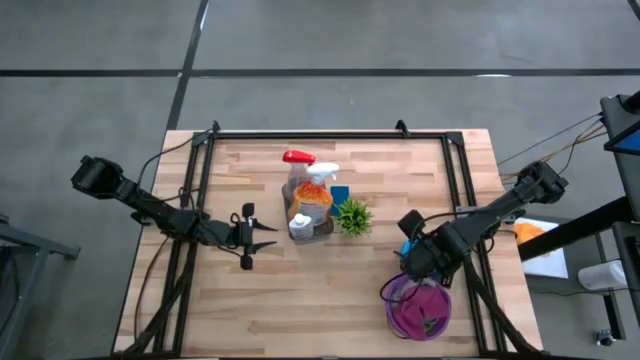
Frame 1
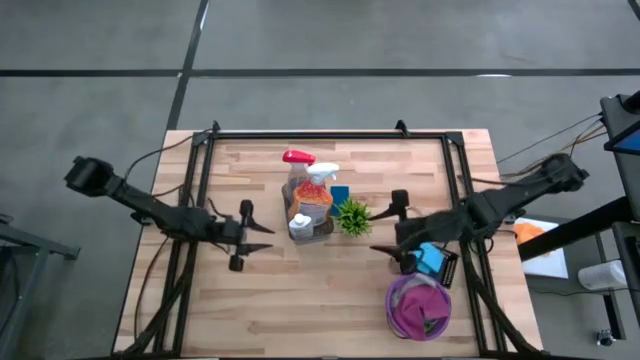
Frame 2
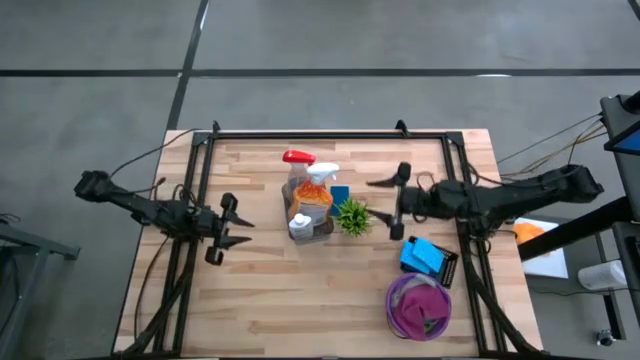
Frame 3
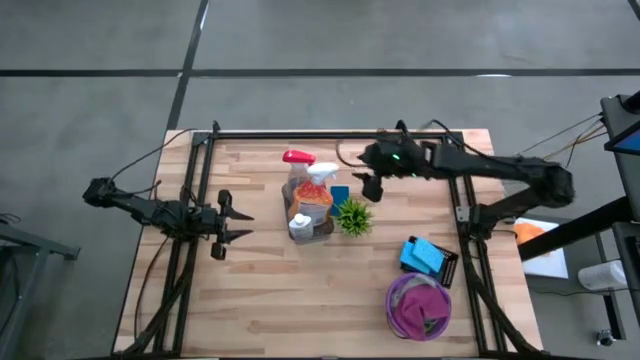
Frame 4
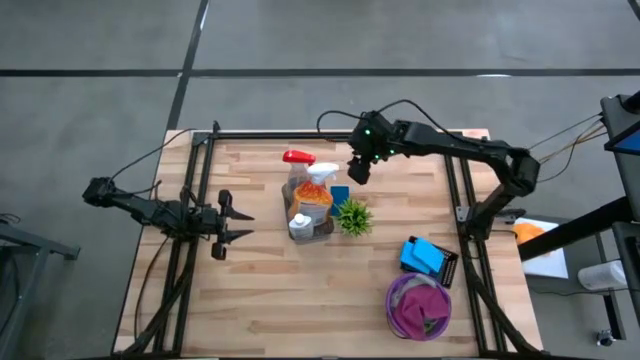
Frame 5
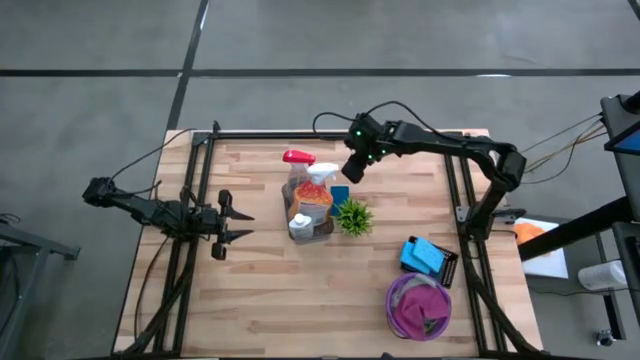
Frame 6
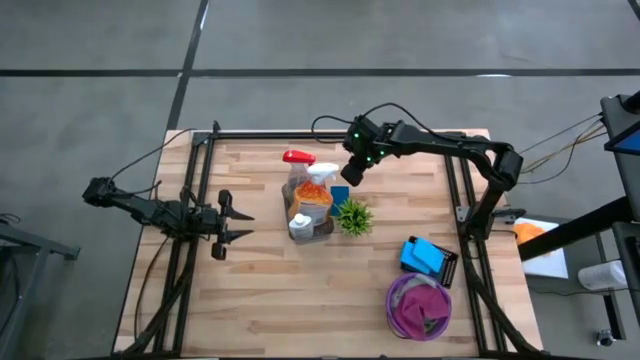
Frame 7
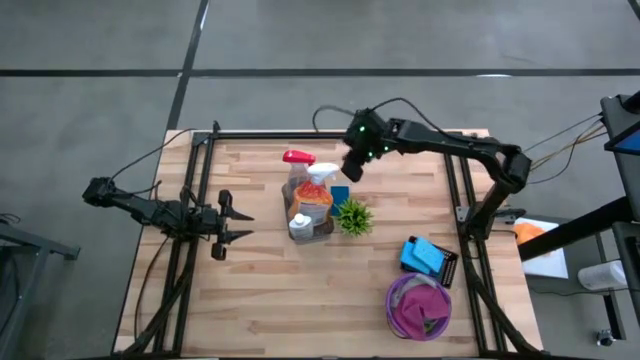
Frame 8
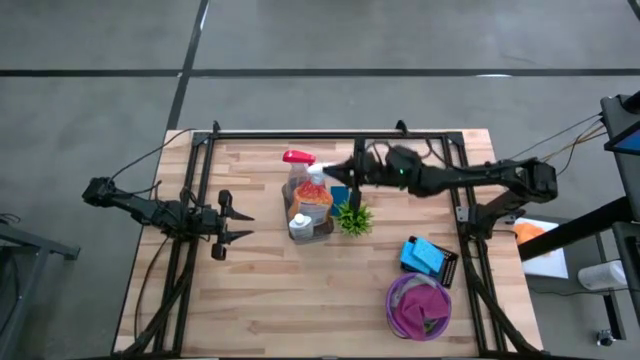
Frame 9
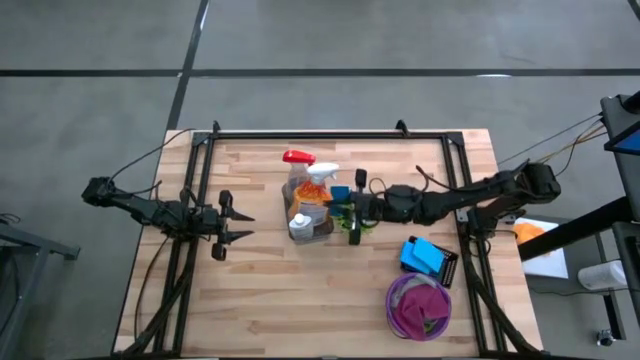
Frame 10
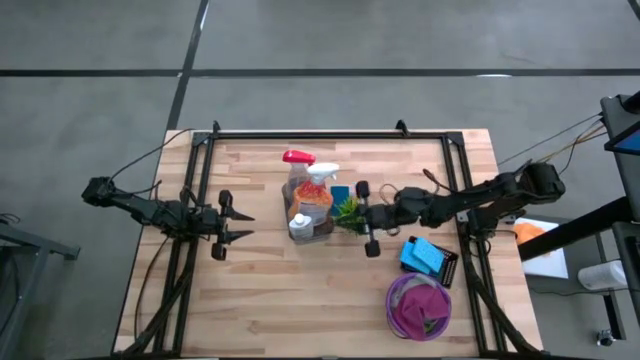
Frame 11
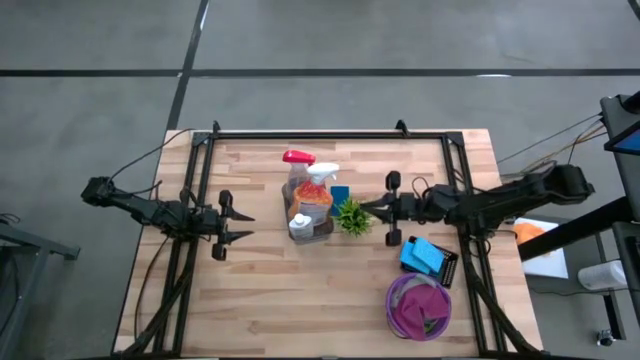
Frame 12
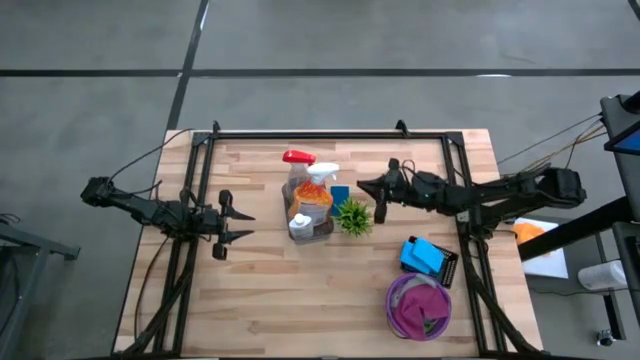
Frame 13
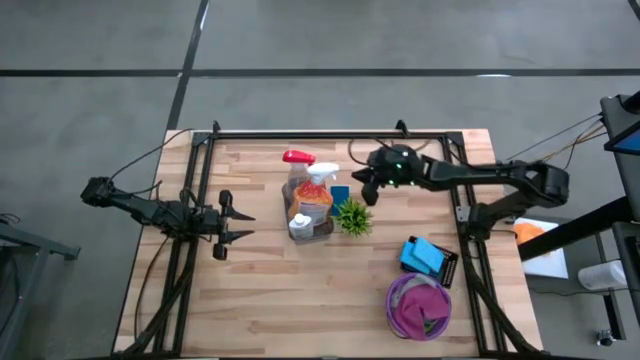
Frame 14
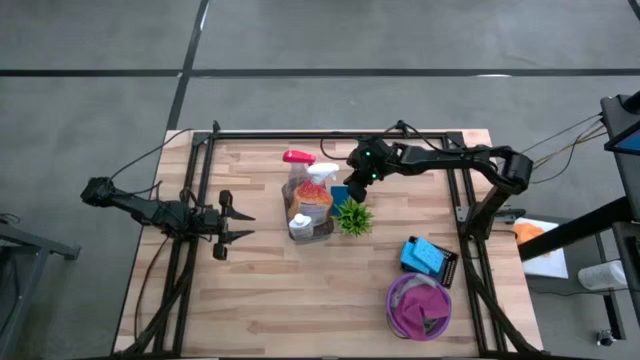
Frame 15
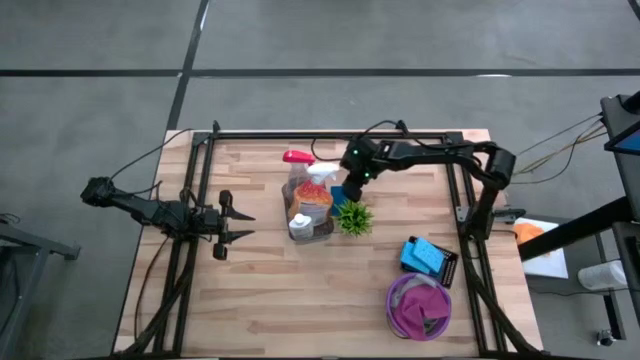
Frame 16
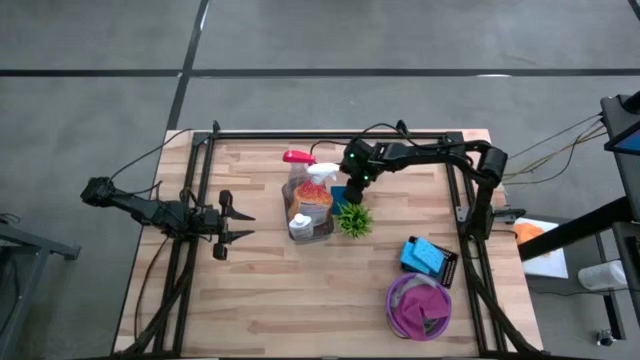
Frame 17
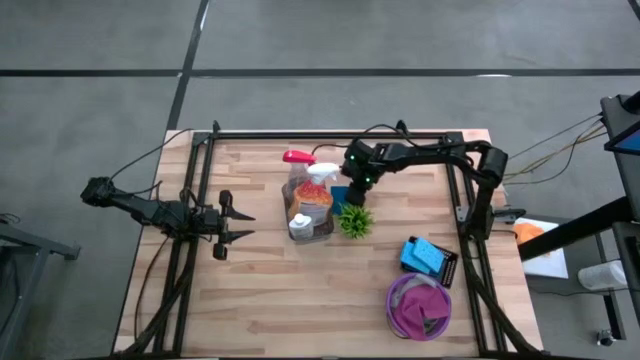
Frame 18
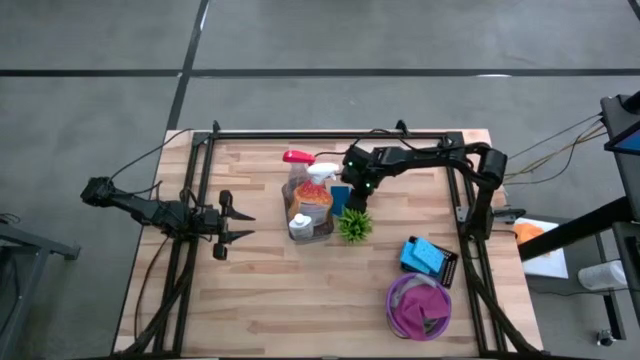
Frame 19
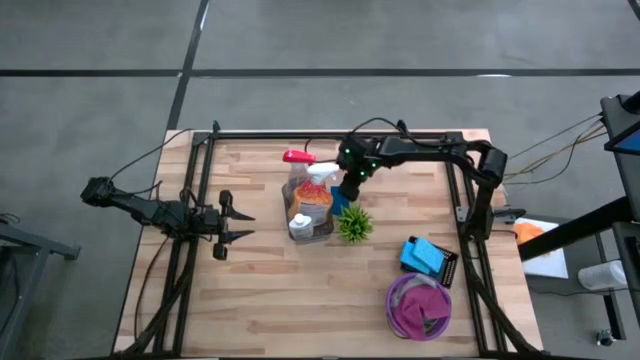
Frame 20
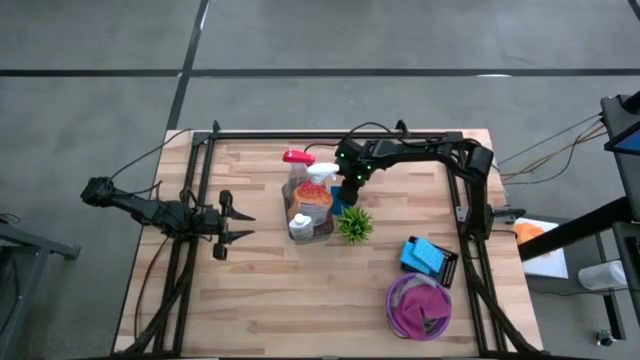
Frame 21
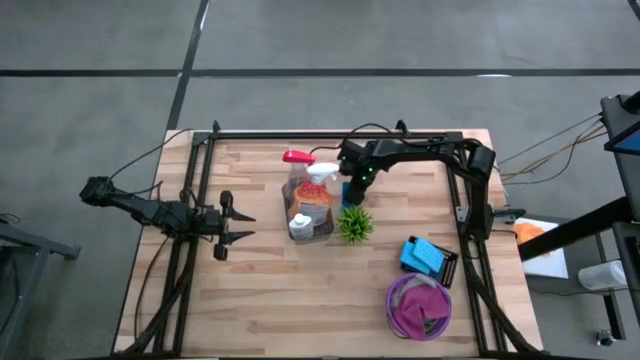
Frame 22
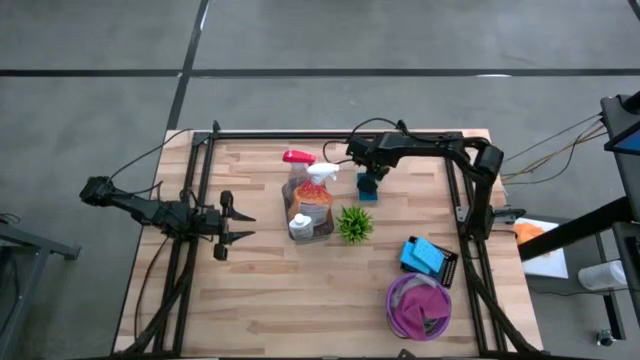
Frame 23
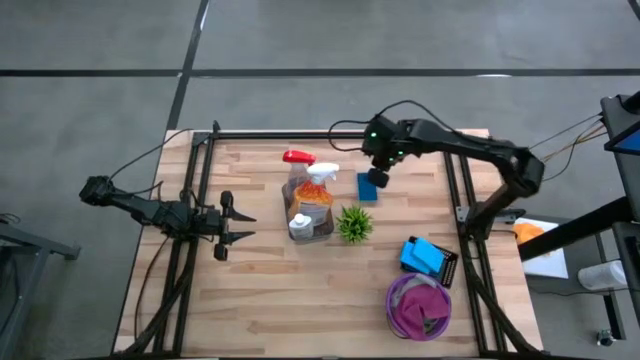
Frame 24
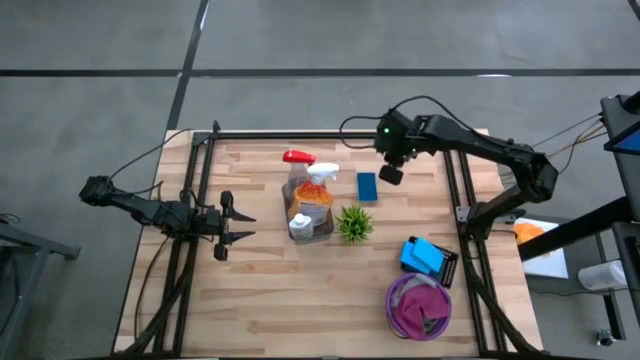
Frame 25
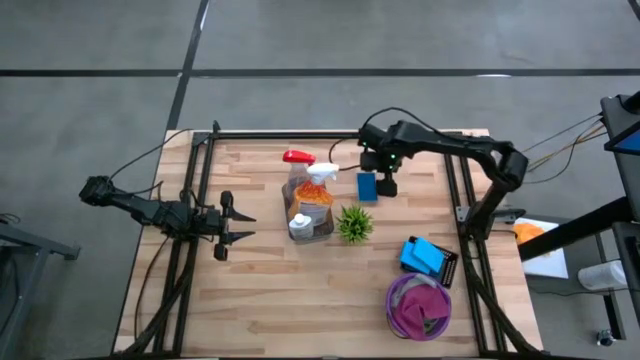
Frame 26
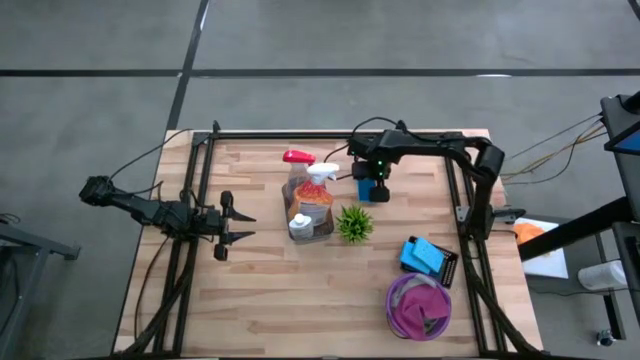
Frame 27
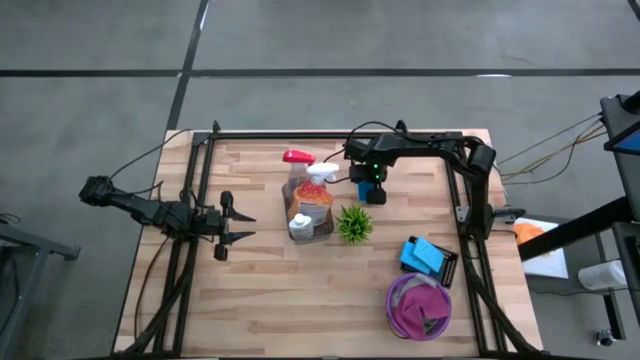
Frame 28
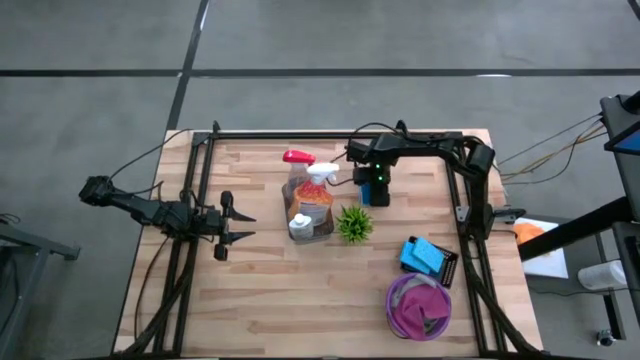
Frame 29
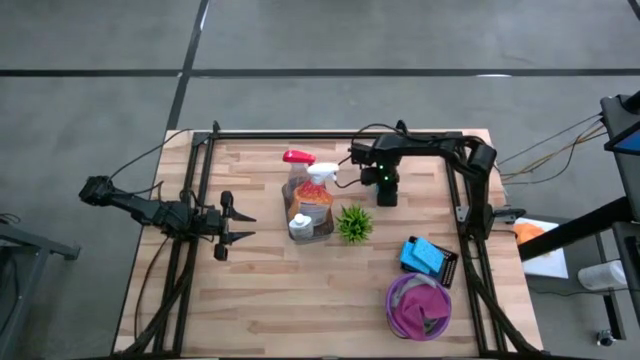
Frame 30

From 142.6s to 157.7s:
Task: Pick & Place Kitchen Items
Put the blue sponge into the black bin

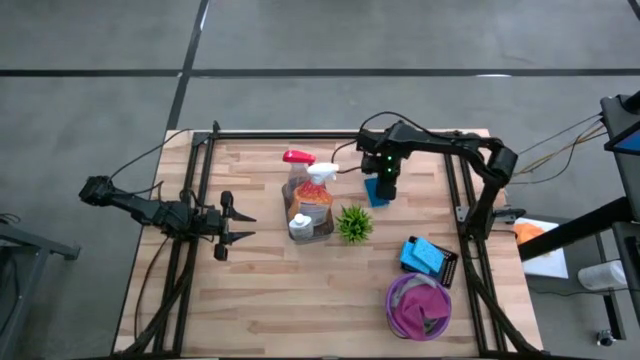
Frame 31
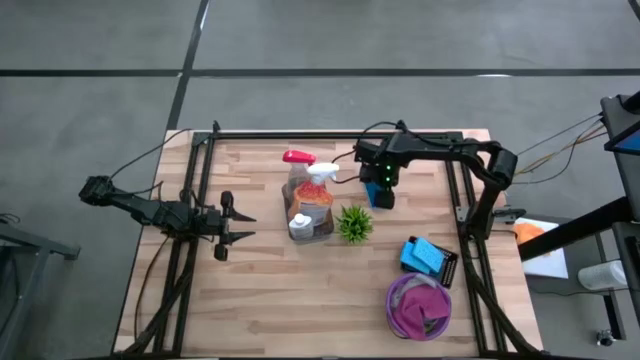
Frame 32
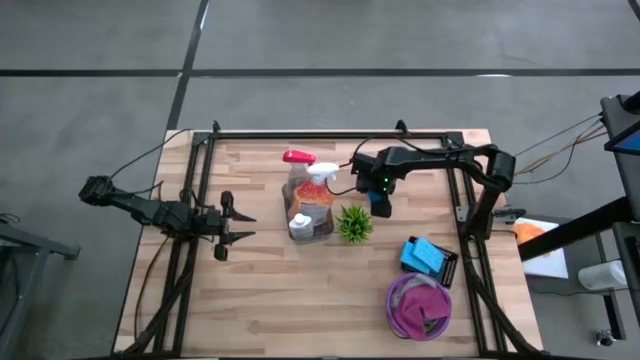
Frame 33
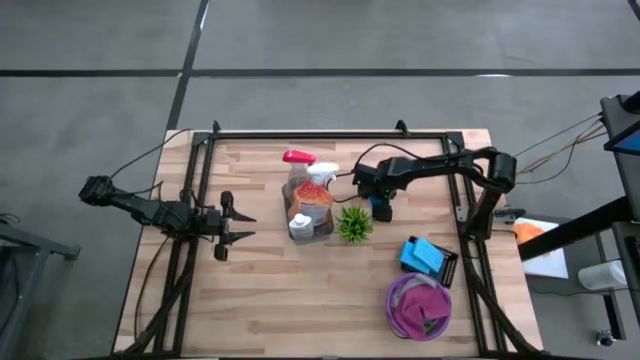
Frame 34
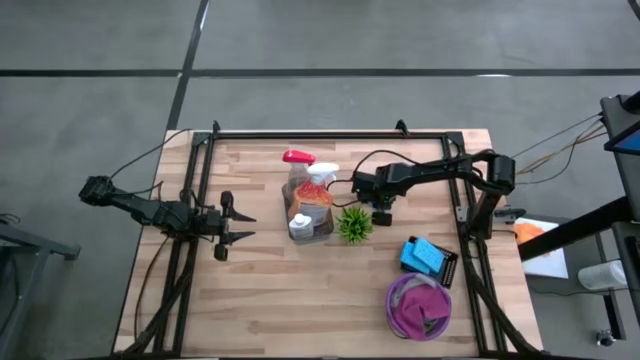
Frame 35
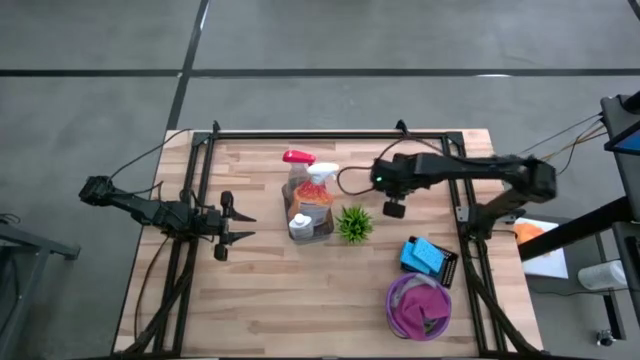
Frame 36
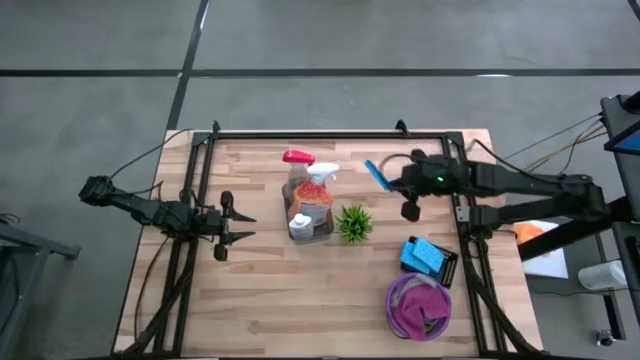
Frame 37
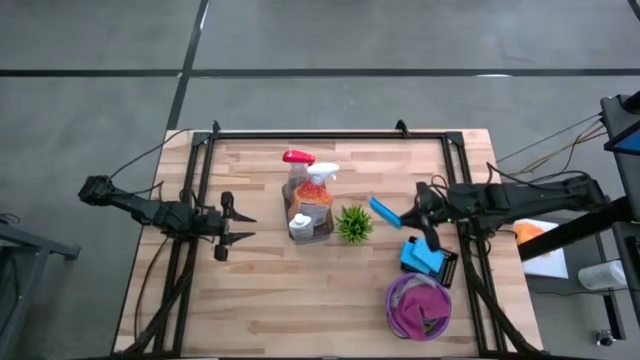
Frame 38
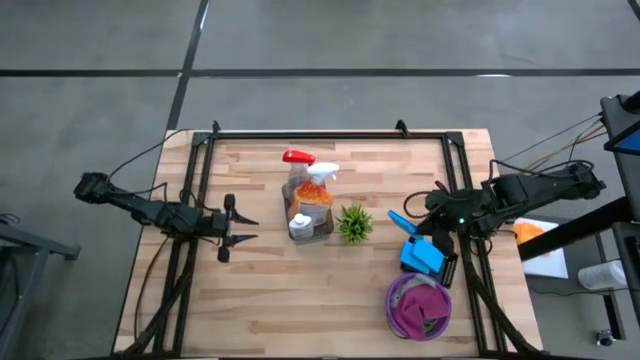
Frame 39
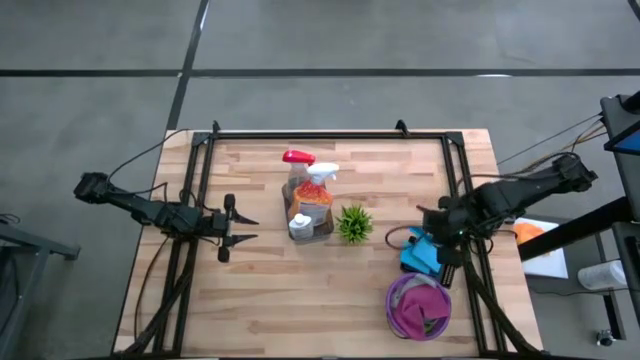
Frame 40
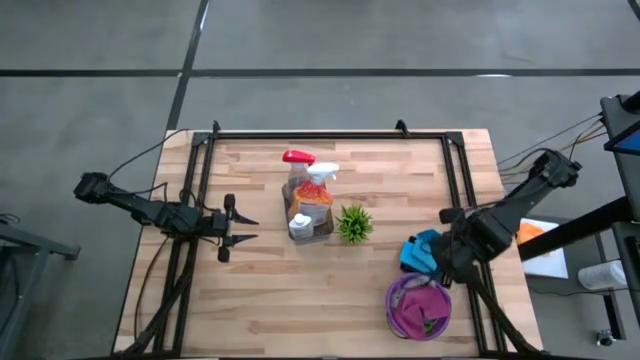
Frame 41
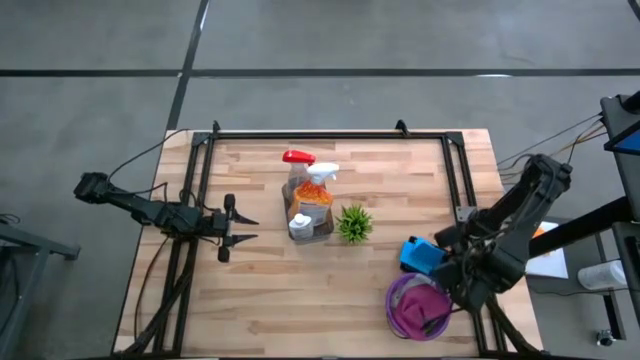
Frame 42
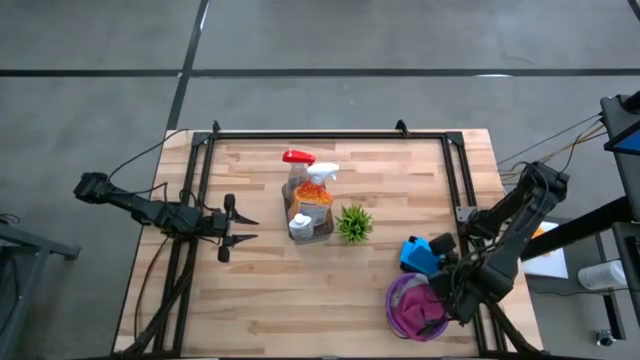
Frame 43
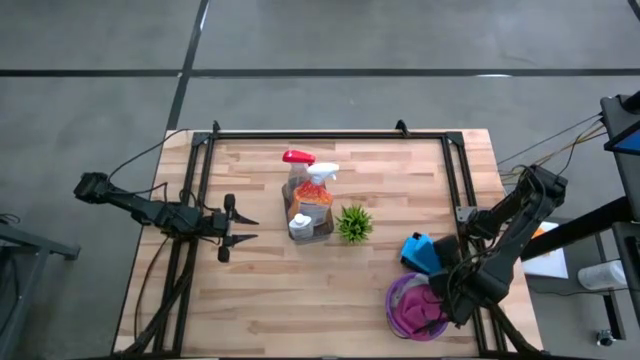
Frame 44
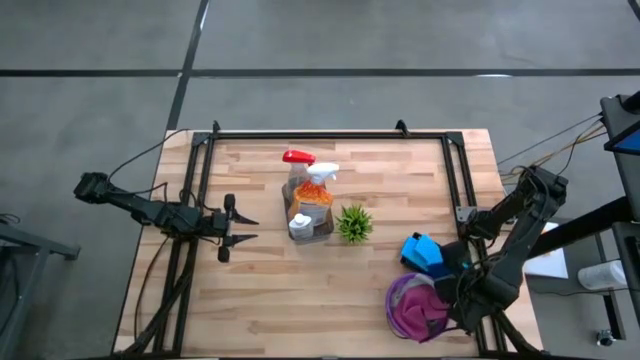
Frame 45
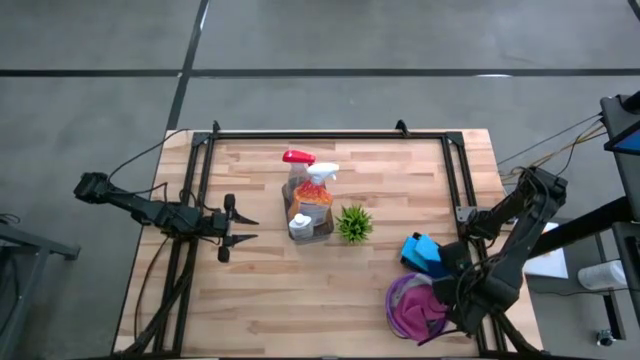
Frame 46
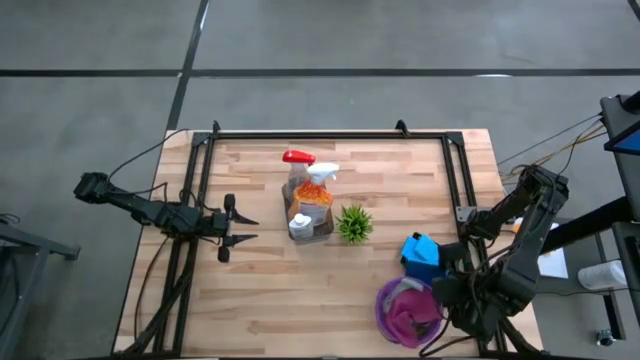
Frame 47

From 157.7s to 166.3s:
Put the blue sponge into the black bin
